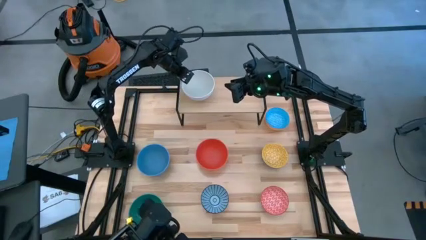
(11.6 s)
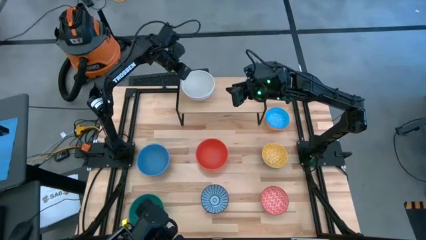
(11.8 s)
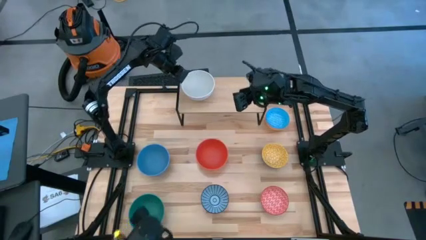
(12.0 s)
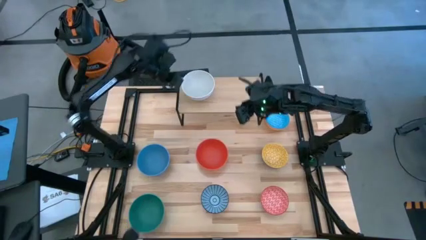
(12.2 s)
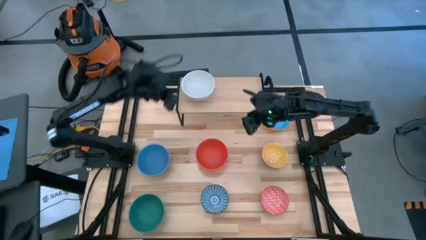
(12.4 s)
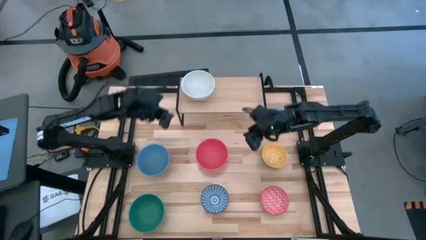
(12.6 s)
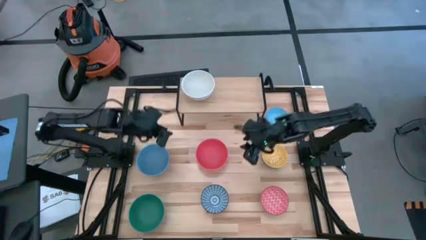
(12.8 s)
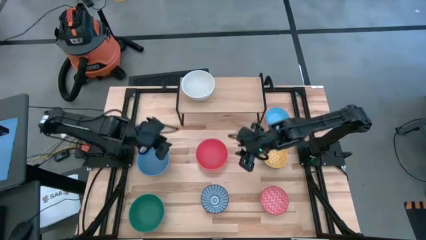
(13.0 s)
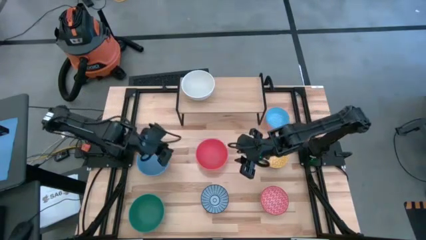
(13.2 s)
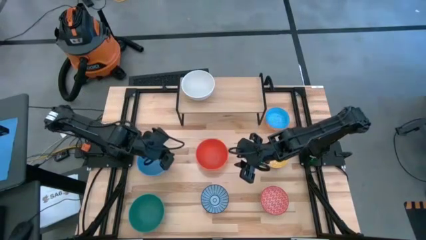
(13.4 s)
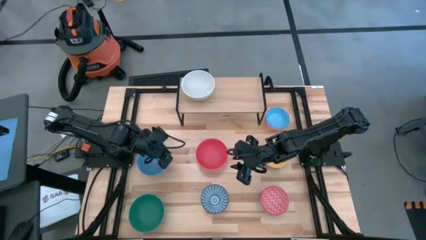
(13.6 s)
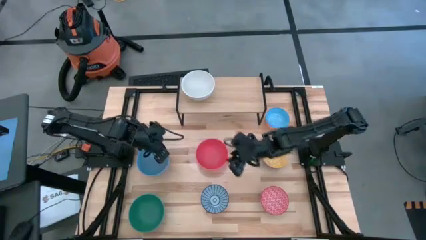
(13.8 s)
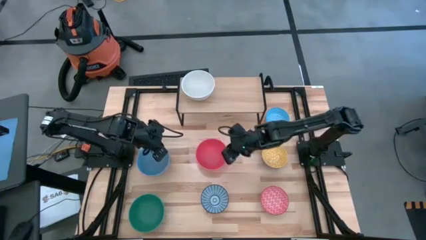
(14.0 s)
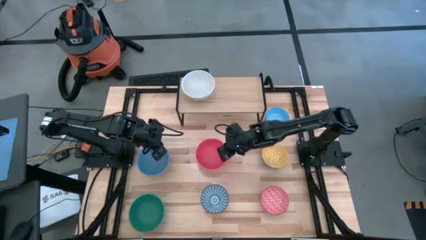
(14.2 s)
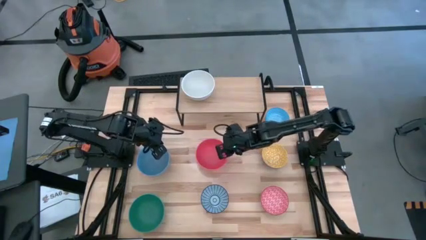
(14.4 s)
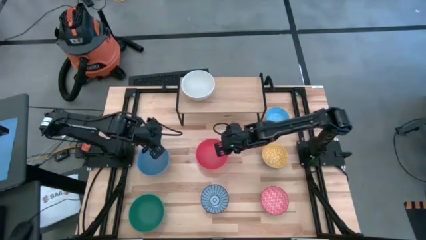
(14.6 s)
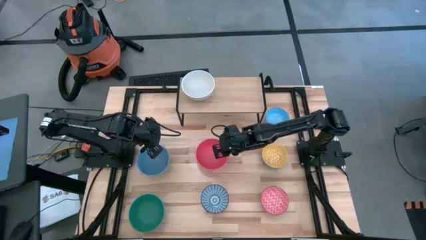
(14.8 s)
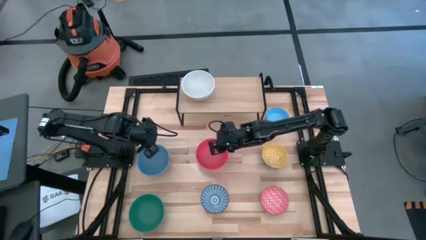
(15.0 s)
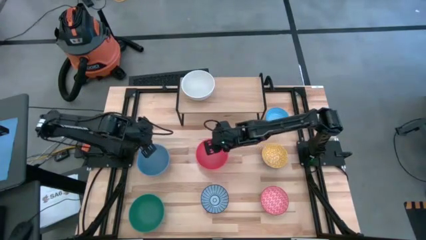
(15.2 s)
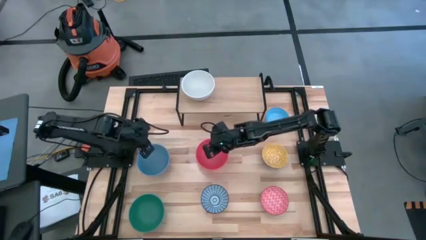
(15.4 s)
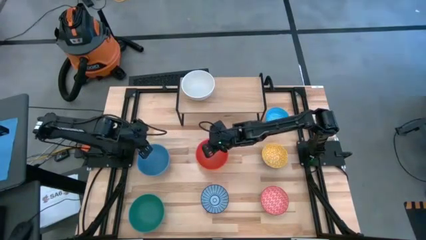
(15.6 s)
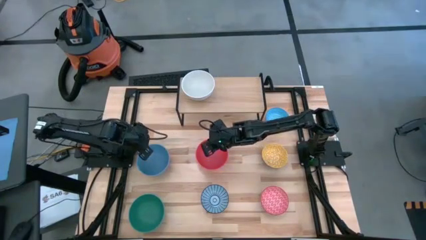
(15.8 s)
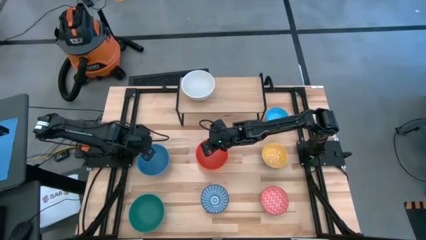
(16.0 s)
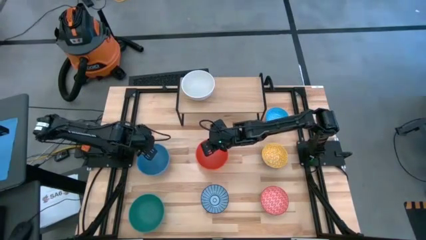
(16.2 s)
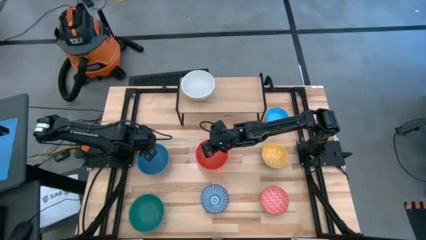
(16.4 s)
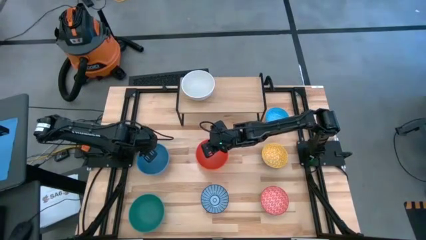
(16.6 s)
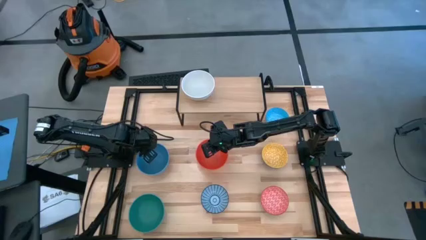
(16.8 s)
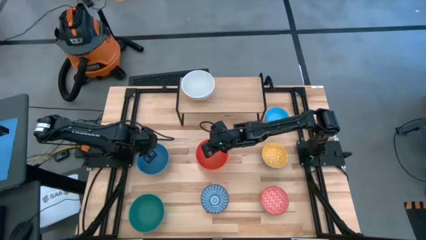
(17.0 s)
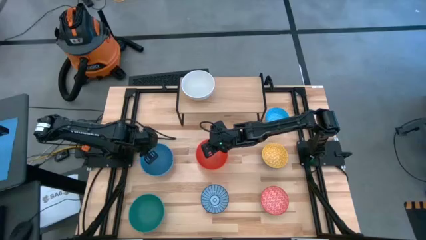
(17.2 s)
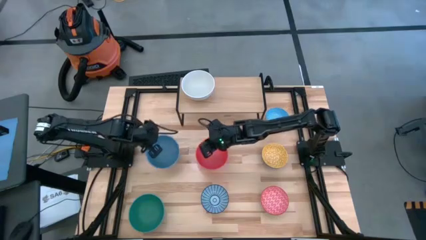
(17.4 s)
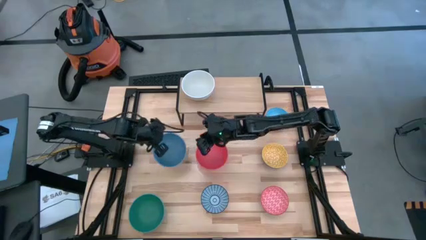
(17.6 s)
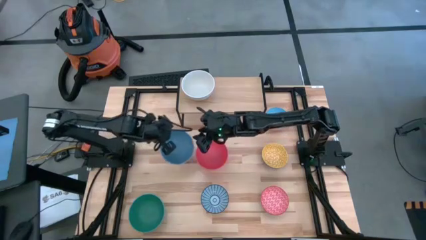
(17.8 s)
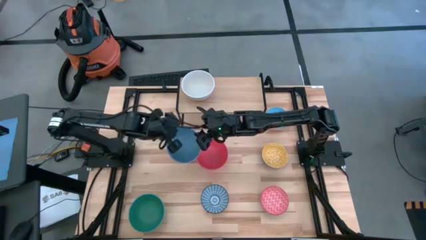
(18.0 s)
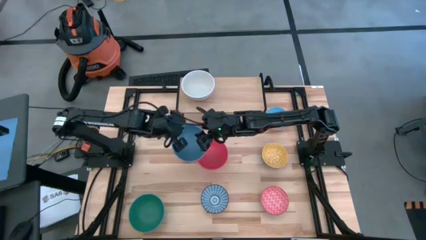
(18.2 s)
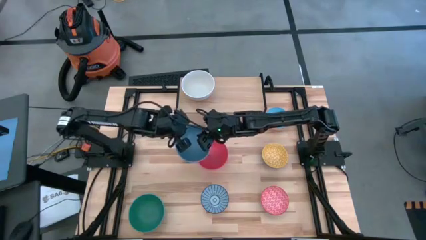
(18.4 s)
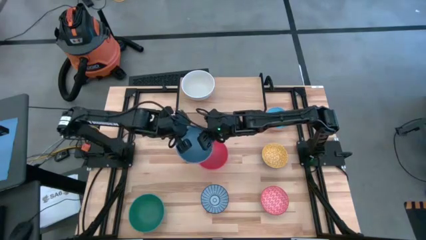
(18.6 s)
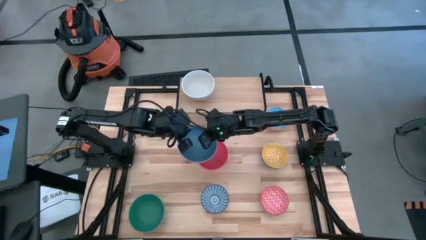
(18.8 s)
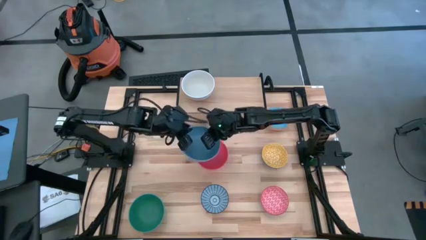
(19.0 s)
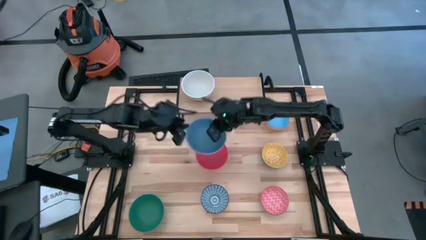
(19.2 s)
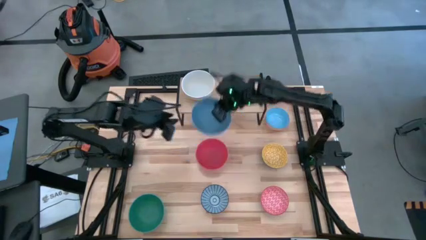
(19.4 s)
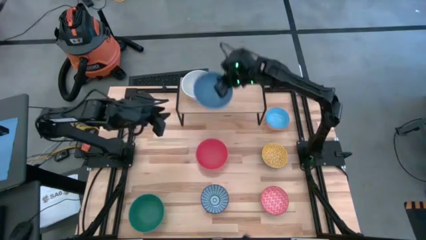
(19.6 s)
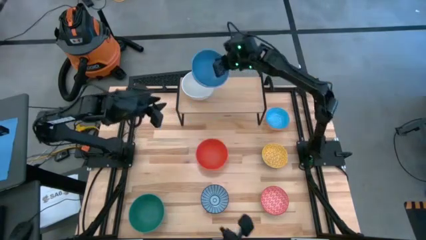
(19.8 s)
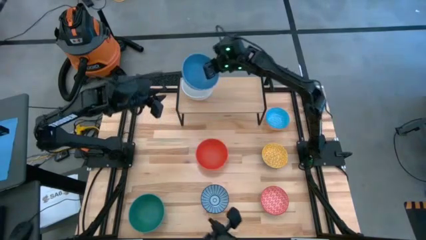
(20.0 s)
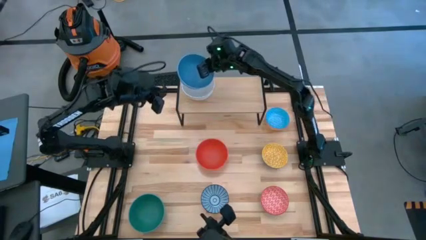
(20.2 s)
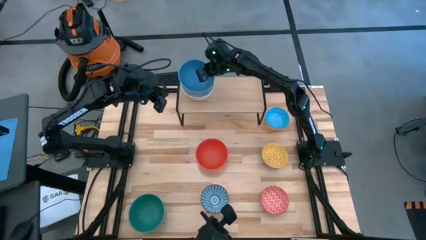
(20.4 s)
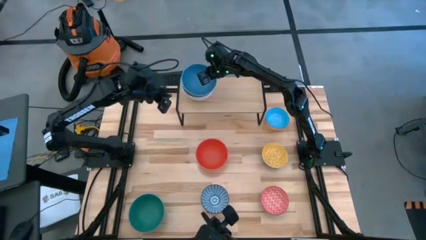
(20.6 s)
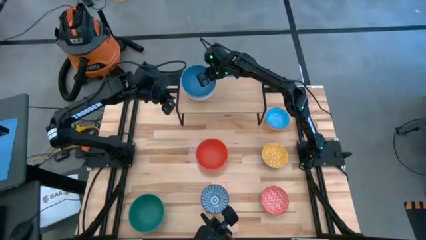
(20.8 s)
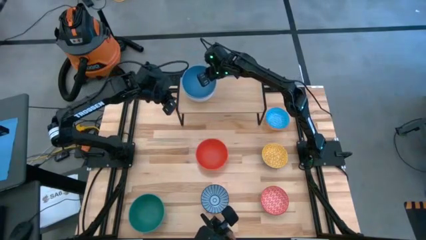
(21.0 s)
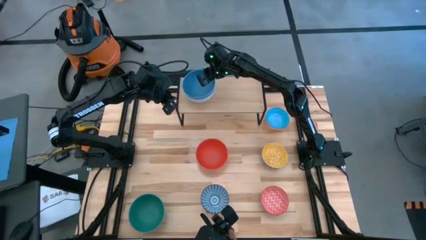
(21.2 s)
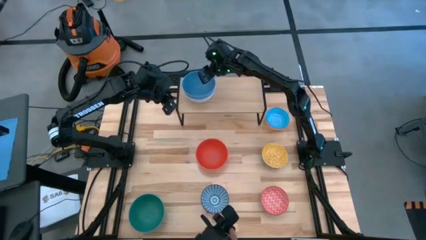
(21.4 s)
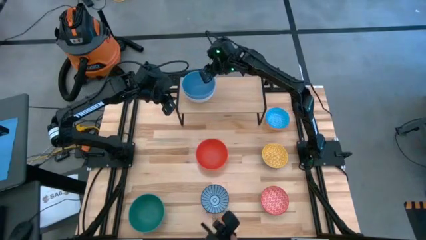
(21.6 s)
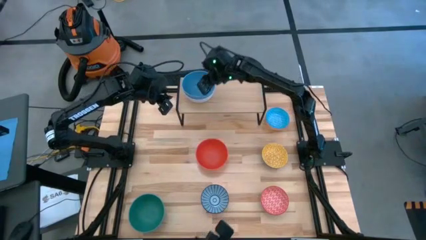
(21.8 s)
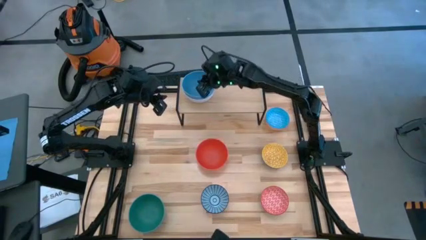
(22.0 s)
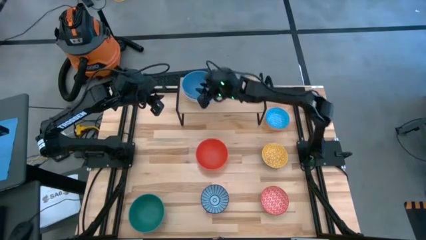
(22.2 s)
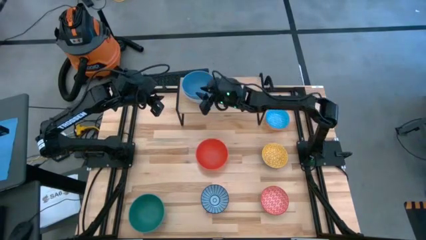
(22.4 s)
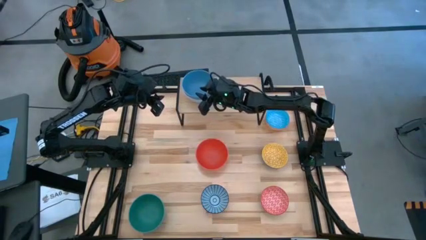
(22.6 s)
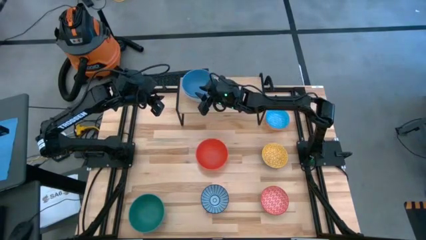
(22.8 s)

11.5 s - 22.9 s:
Task: Place and stack bowls onto a shelf
Stack the blue bowl on top of the white bowl on the shelf
